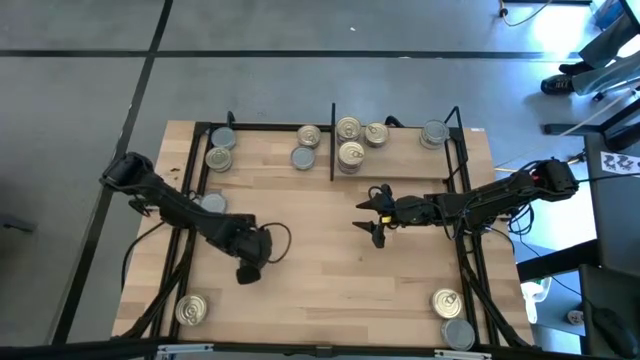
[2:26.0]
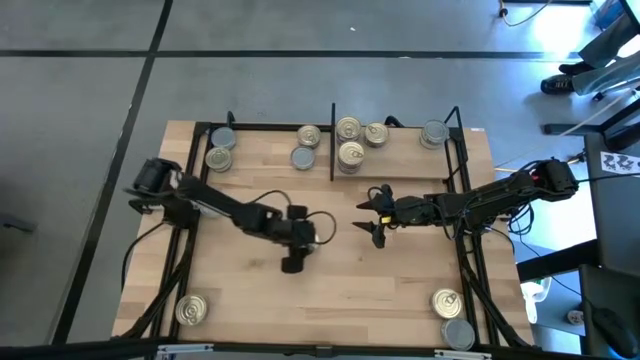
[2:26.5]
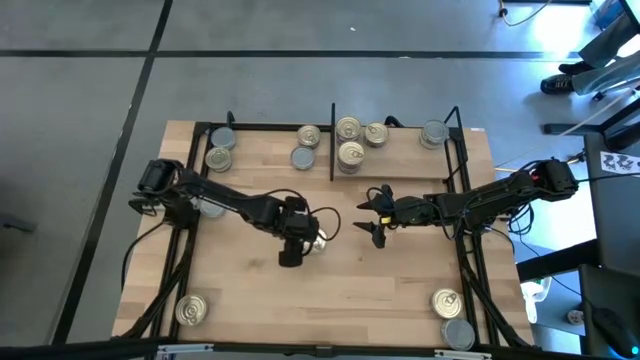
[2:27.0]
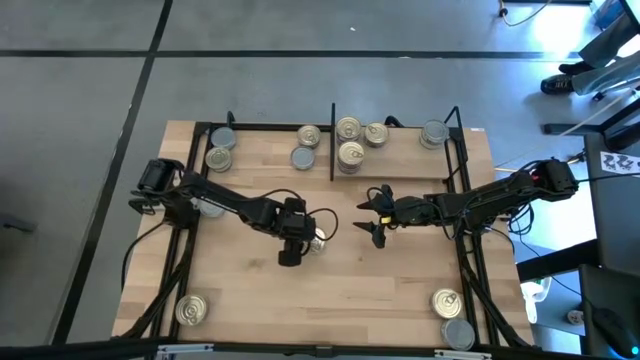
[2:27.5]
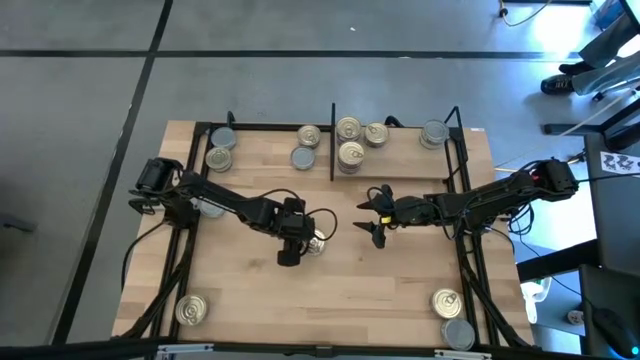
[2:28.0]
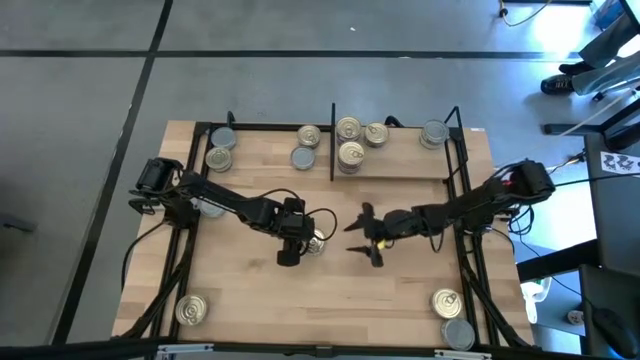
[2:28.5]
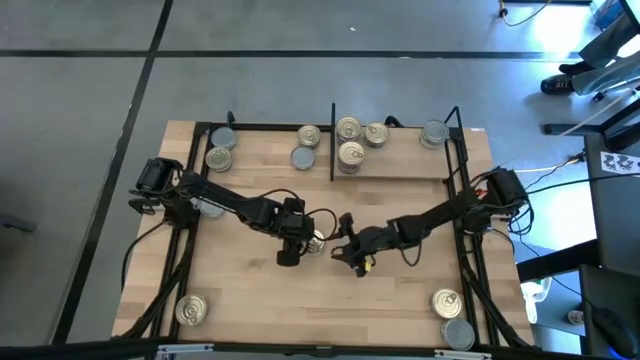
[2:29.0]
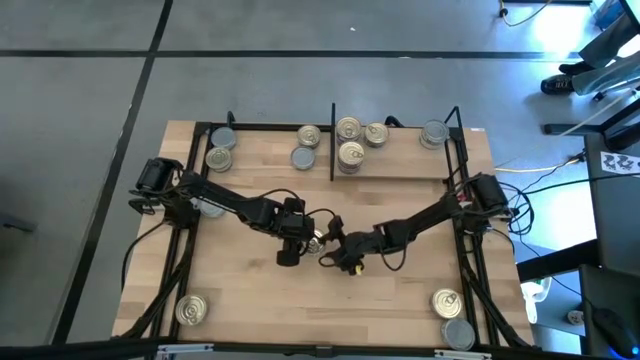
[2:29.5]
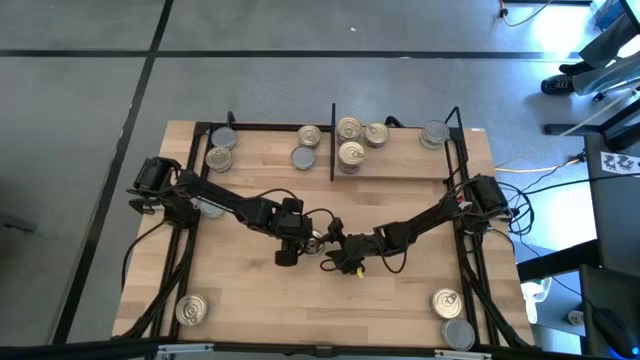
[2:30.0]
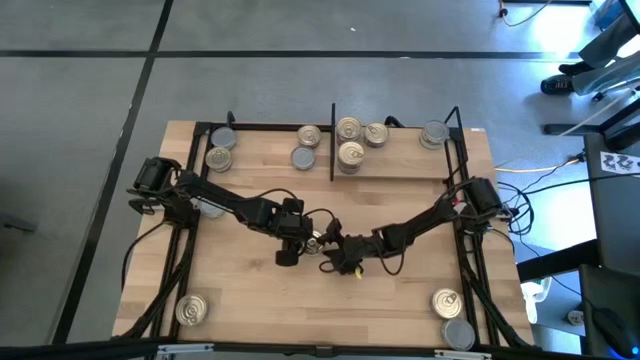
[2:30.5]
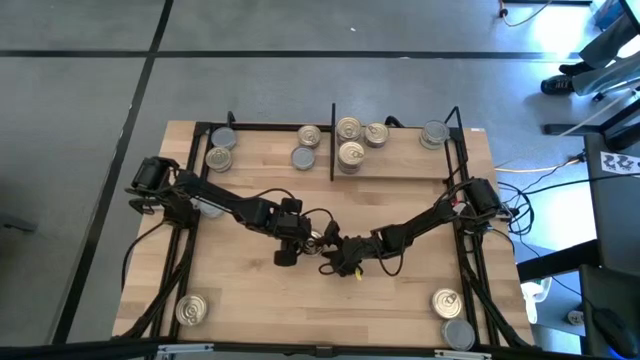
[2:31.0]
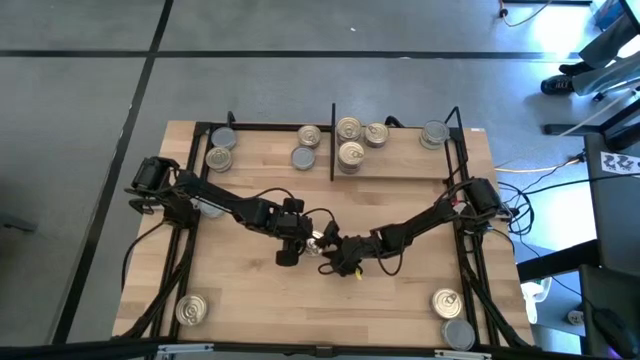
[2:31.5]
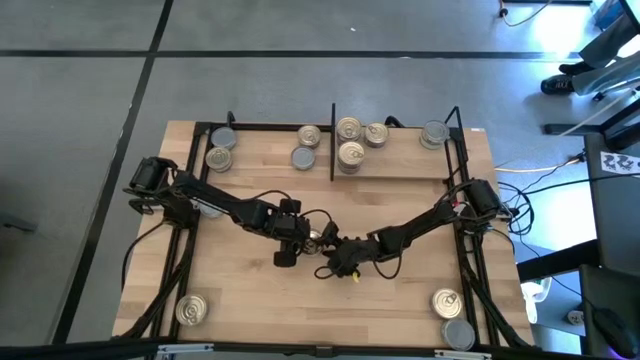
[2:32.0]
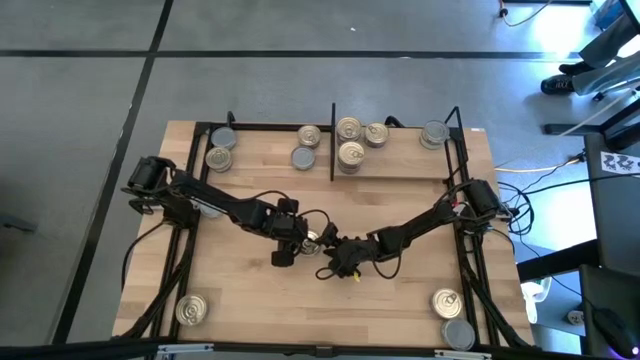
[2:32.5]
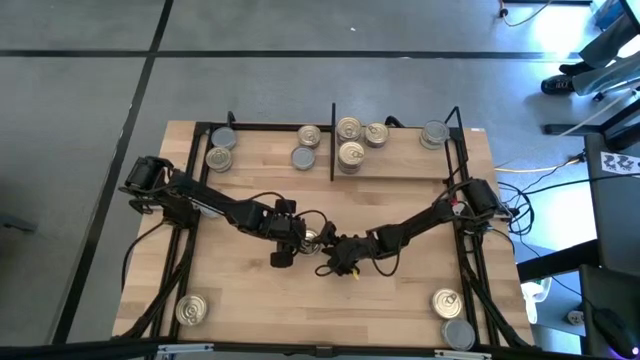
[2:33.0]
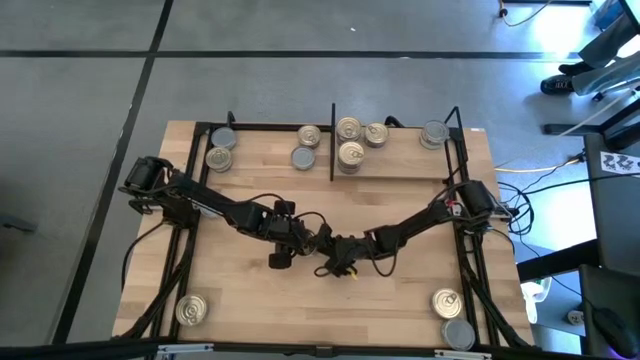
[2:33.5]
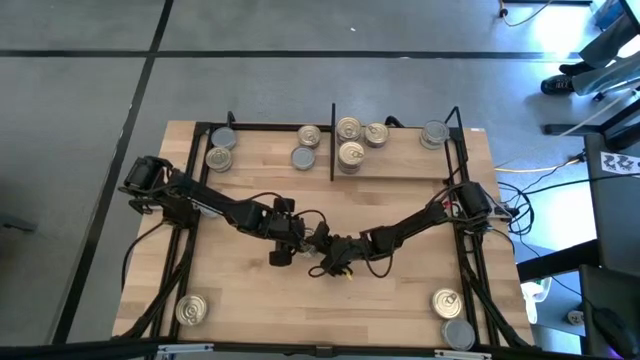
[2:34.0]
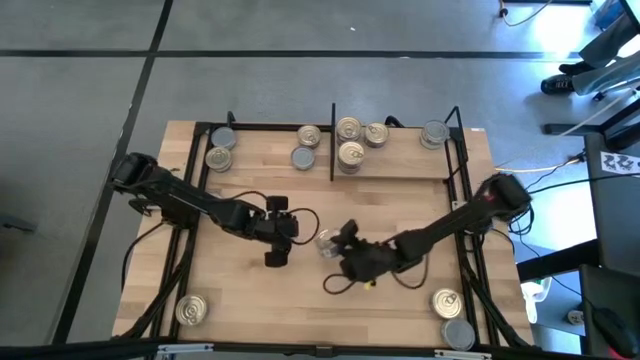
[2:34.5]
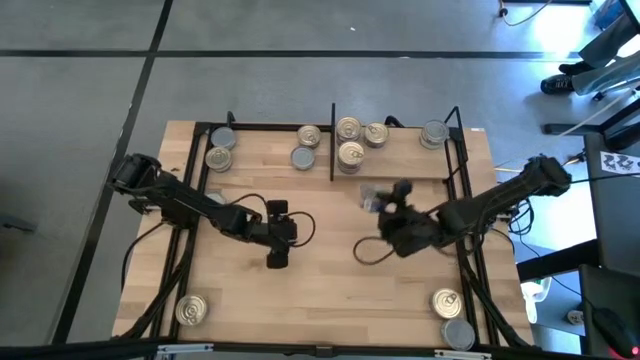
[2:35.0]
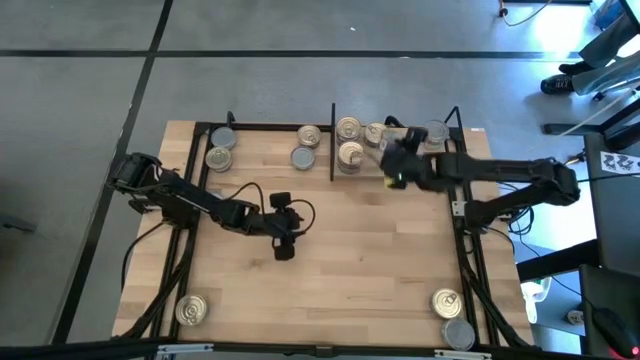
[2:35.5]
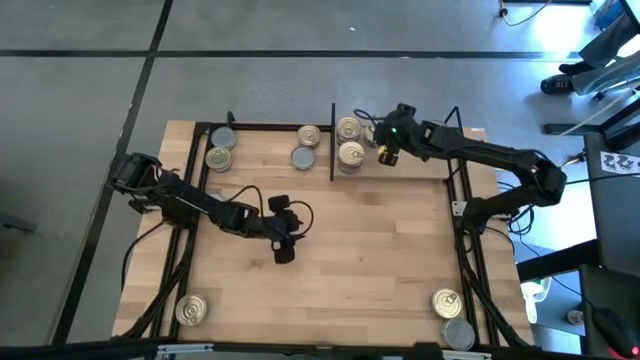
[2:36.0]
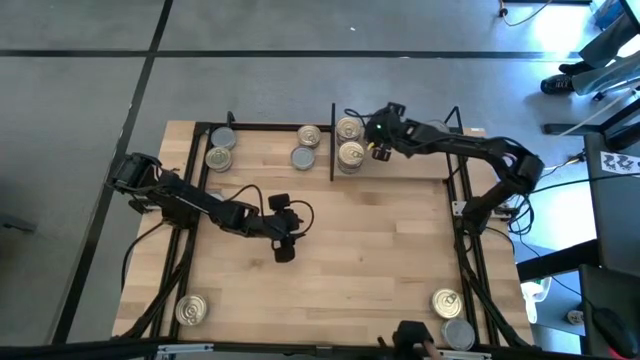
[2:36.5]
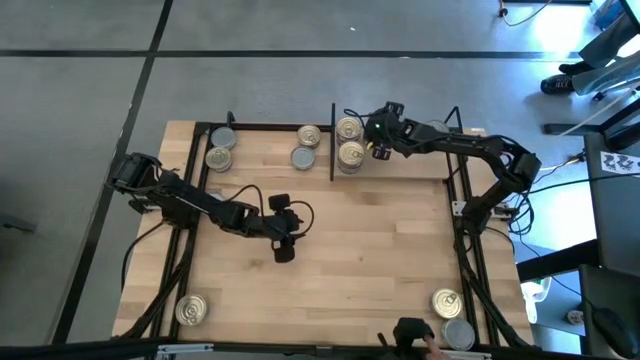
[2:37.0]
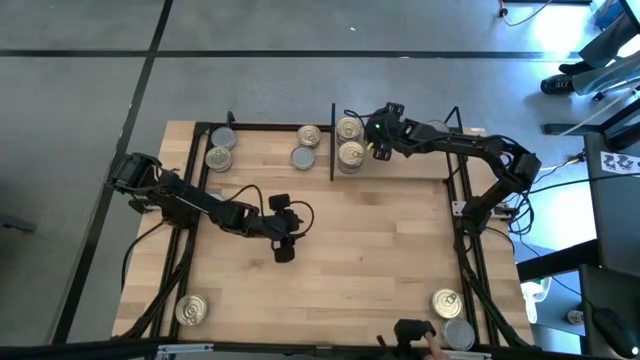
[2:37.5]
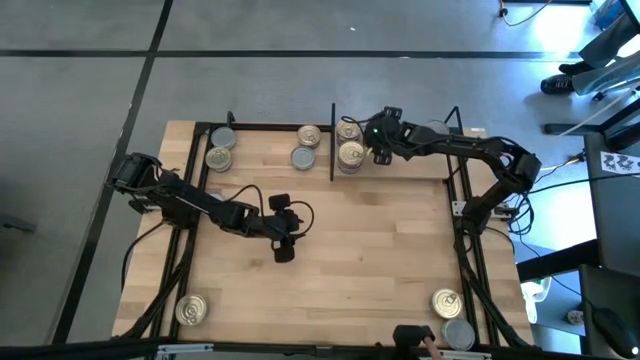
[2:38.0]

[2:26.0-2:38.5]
Task: Stack canned seafood by type on shelf
Stack the blue tuna can on top of the blue tuna can

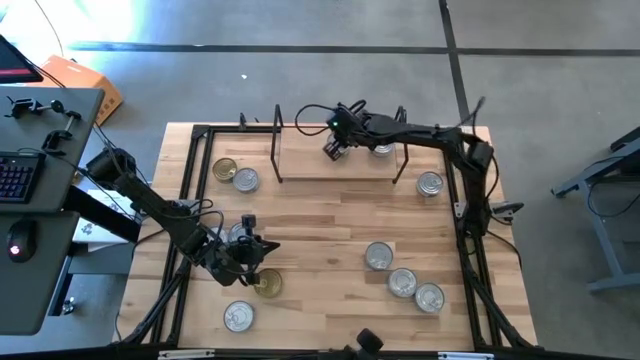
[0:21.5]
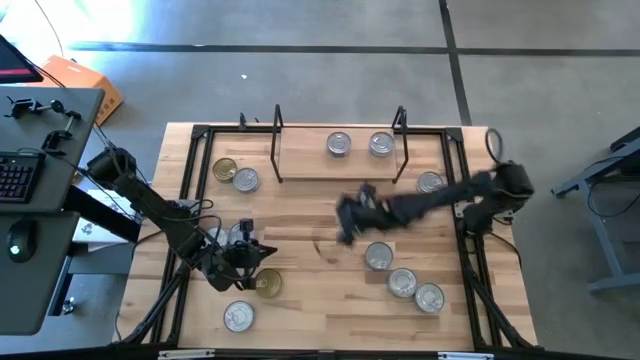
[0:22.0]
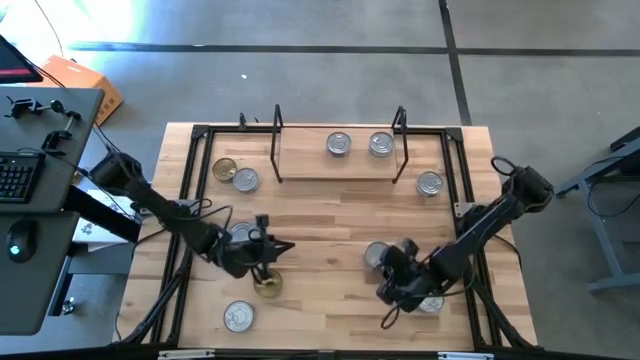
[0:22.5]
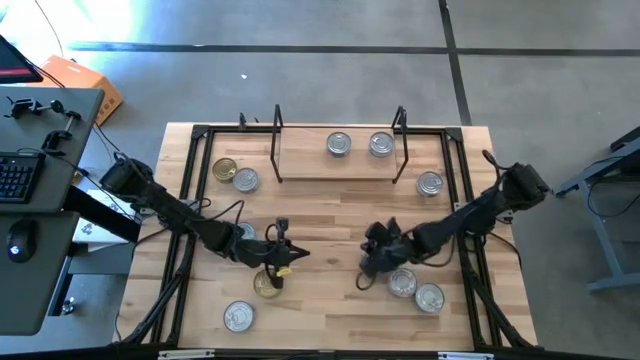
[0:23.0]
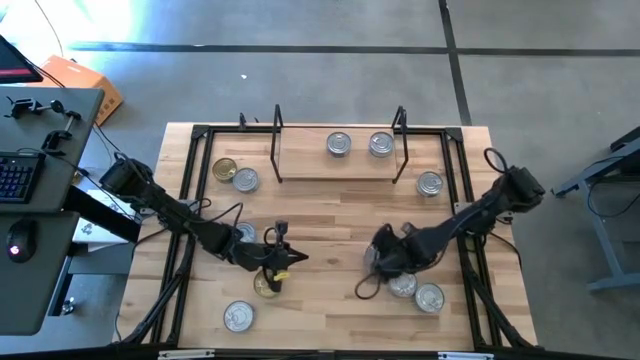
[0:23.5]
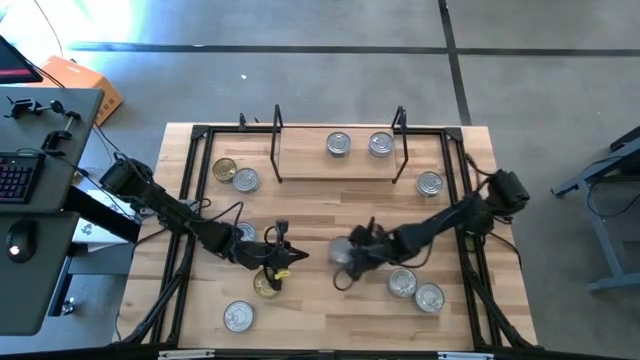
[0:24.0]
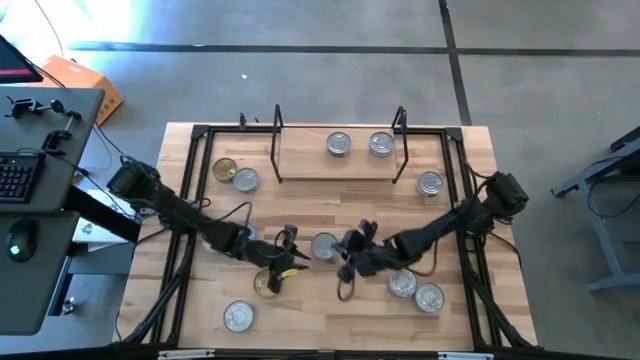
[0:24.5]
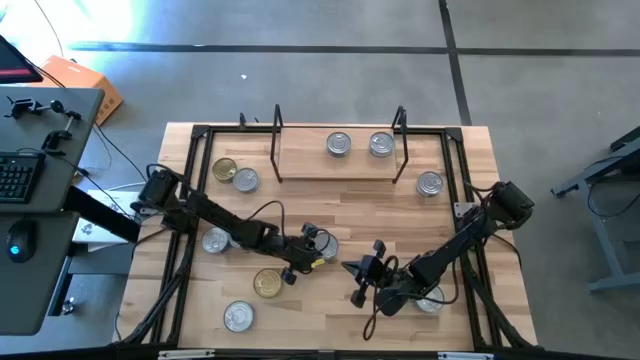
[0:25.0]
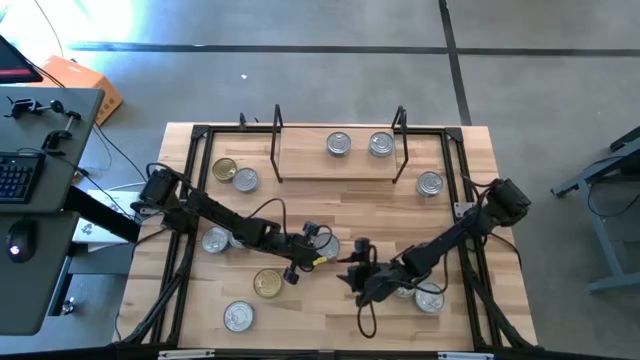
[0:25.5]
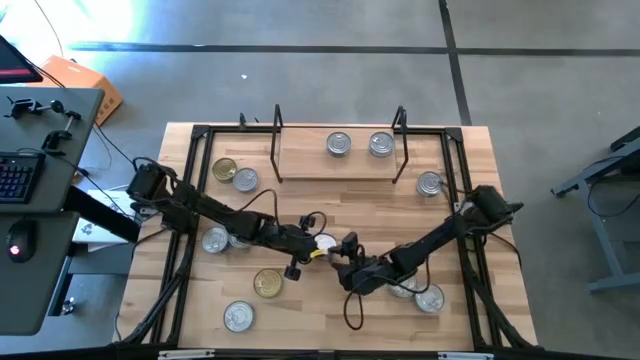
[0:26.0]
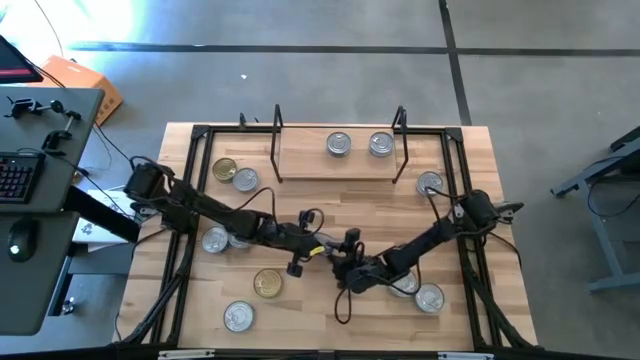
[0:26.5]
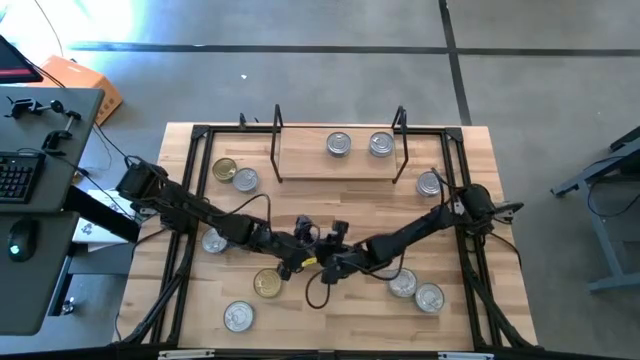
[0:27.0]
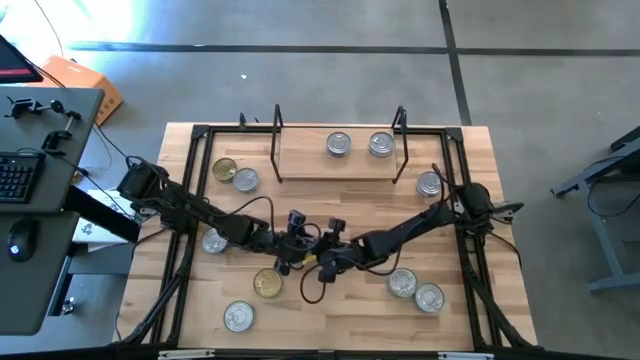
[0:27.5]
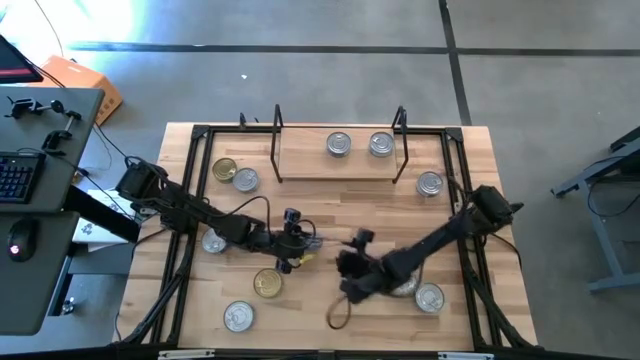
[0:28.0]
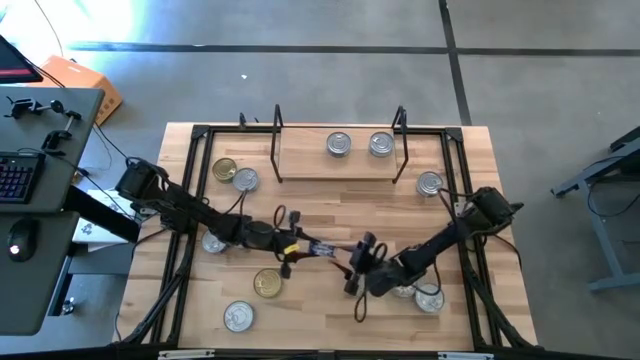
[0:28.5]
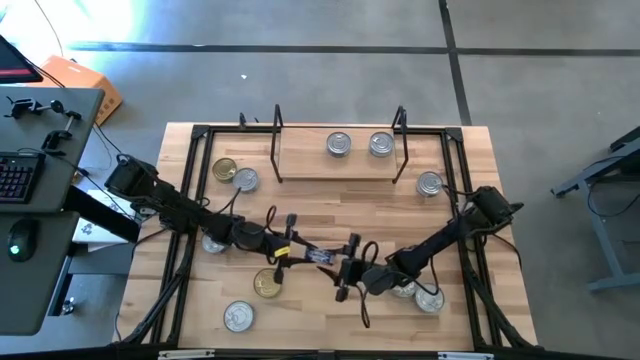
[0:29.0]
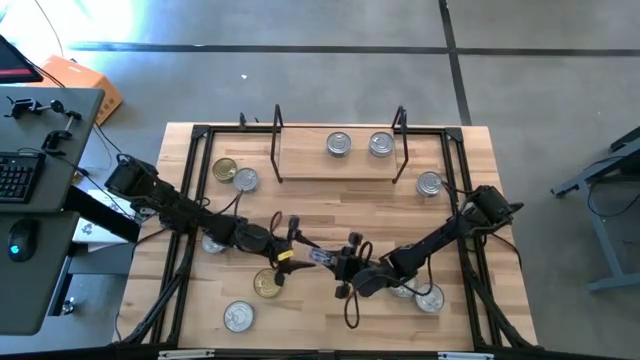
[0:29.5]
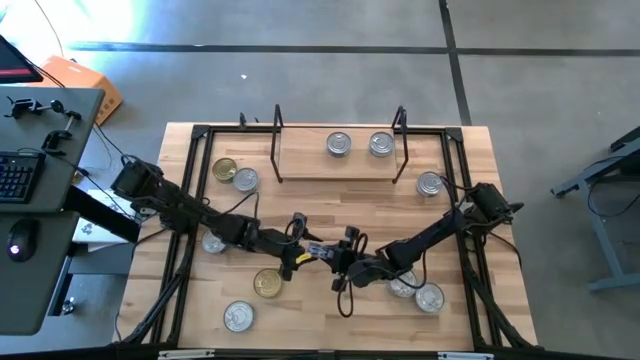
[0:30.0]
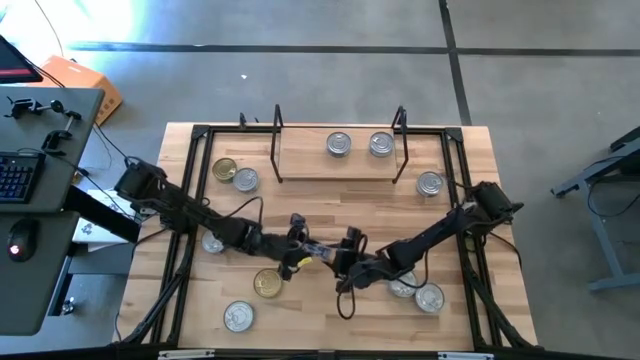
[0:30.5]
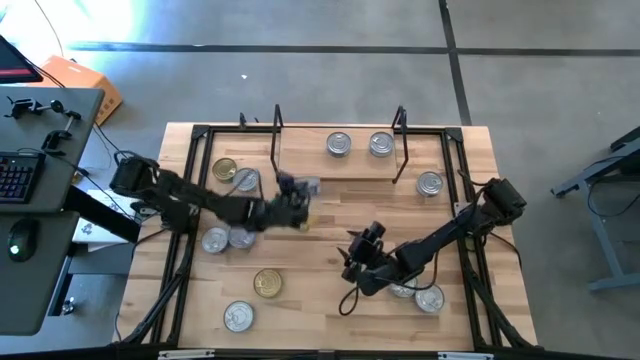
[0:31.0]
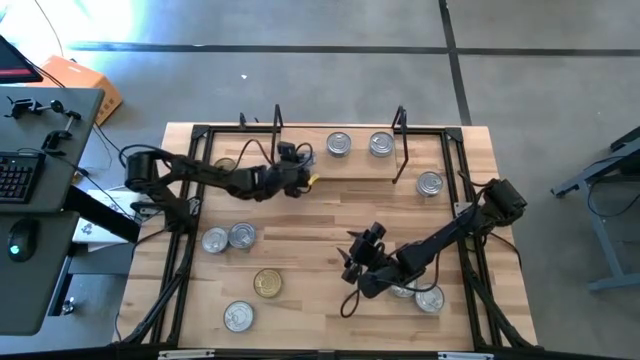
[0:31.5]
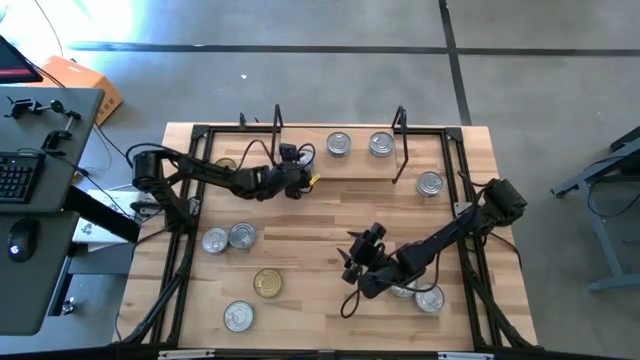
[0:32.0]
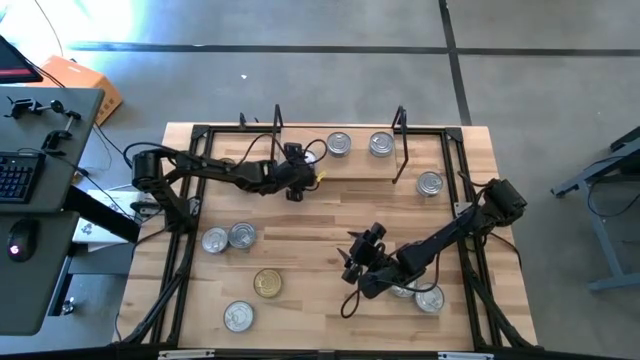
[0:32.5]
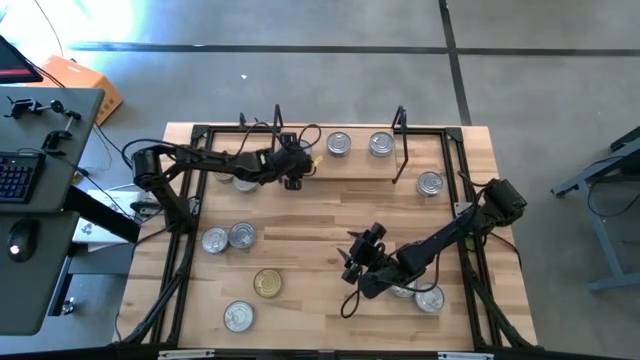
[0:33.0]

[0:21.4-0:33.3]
Task: Stack canned seafood by type on shelf
Put the blue tuna can on the shelf
